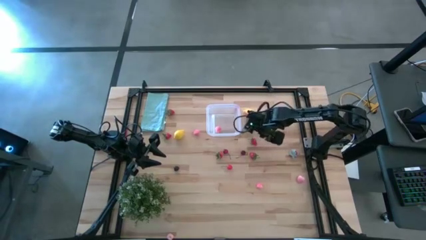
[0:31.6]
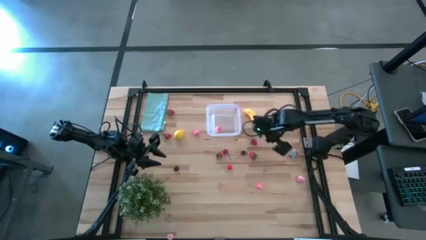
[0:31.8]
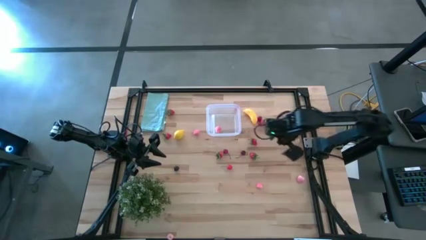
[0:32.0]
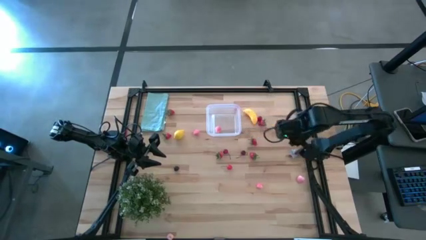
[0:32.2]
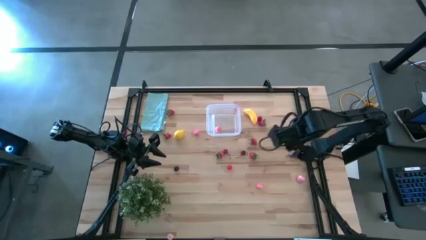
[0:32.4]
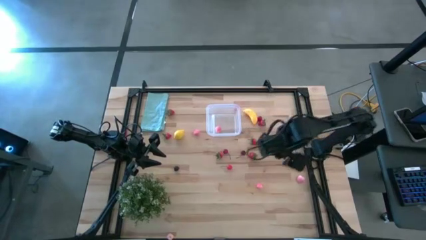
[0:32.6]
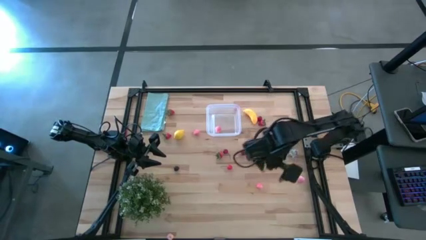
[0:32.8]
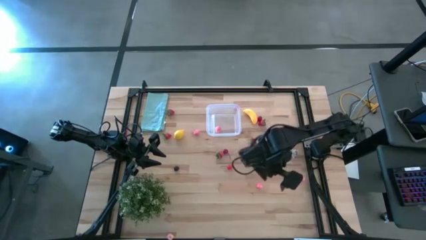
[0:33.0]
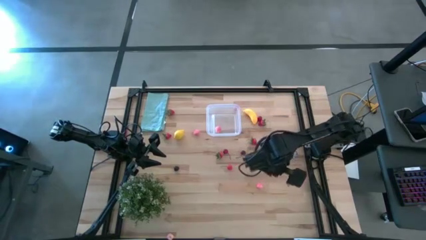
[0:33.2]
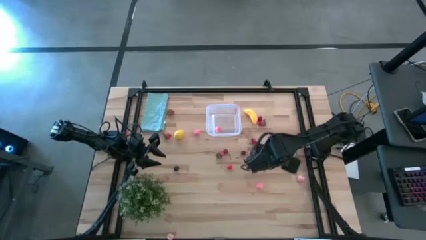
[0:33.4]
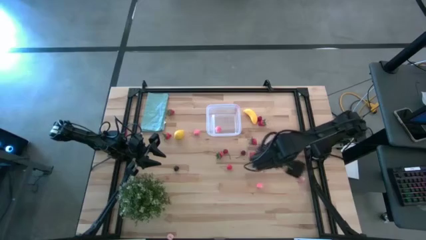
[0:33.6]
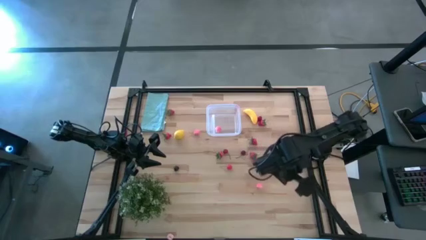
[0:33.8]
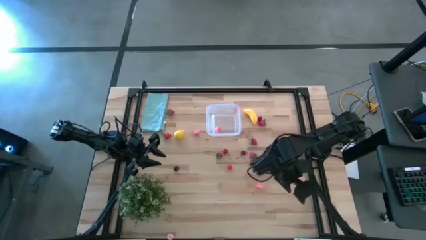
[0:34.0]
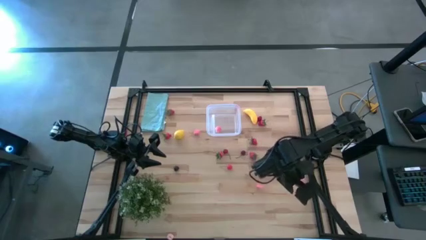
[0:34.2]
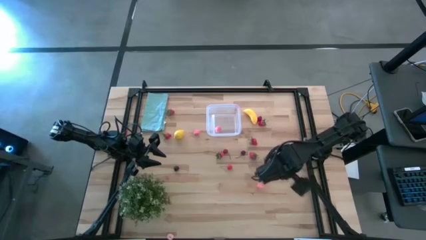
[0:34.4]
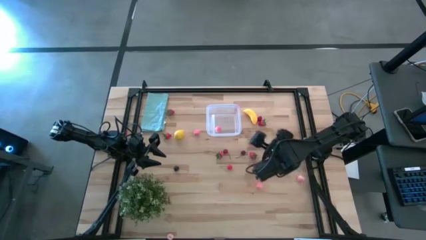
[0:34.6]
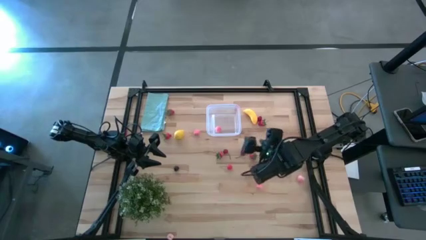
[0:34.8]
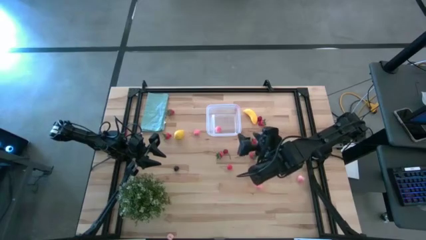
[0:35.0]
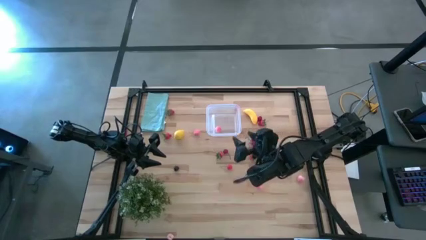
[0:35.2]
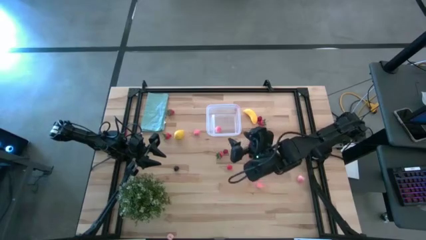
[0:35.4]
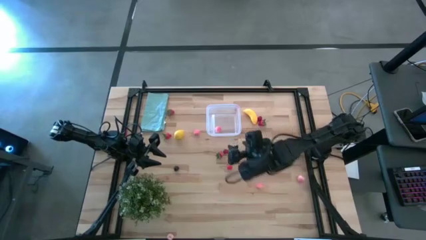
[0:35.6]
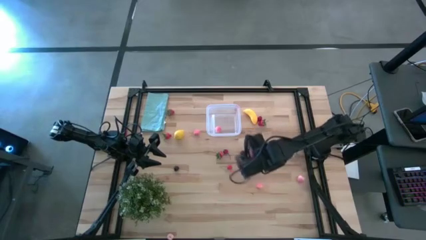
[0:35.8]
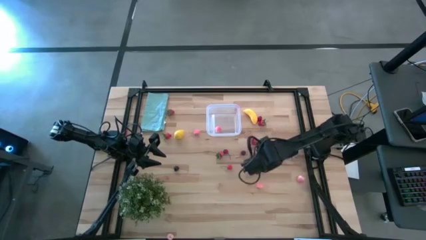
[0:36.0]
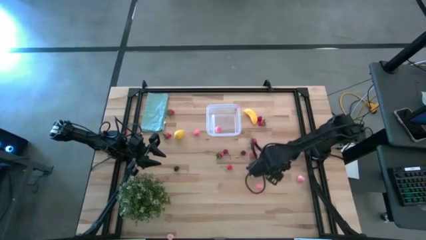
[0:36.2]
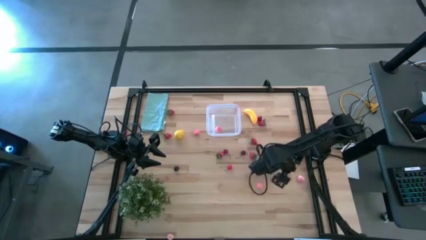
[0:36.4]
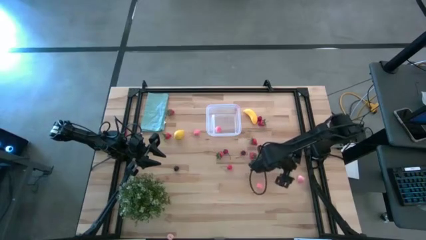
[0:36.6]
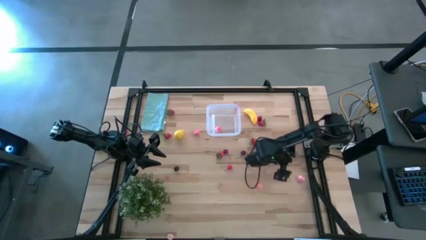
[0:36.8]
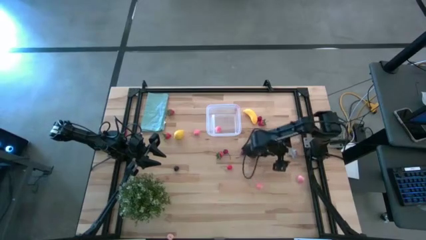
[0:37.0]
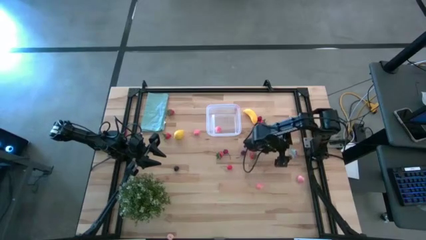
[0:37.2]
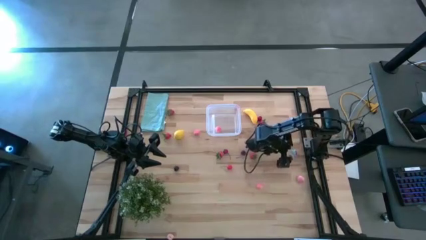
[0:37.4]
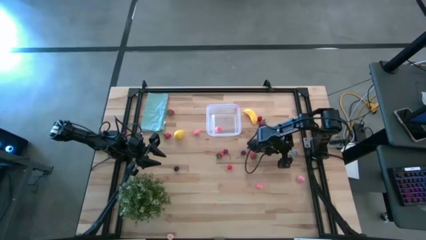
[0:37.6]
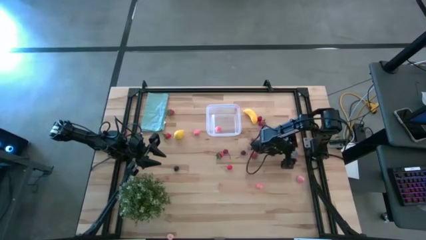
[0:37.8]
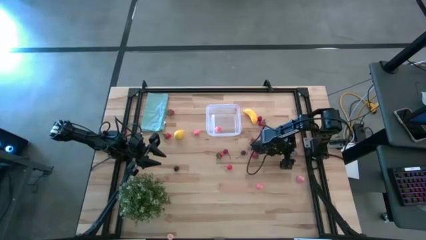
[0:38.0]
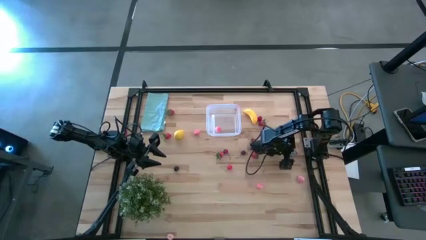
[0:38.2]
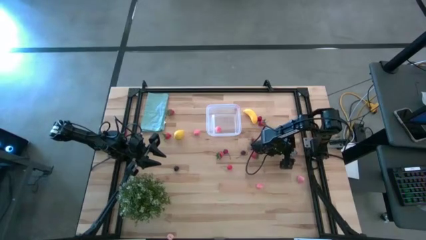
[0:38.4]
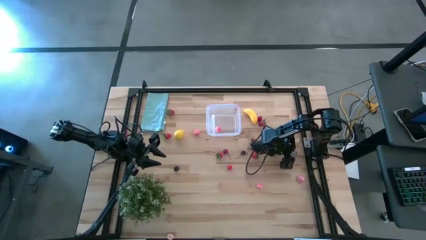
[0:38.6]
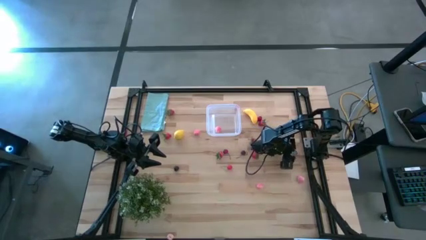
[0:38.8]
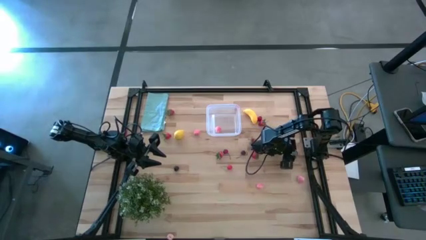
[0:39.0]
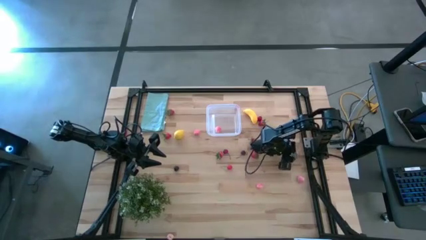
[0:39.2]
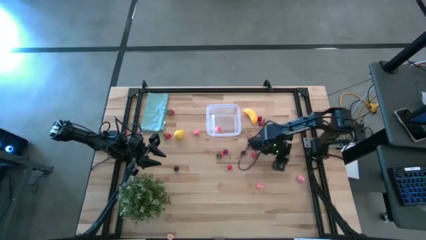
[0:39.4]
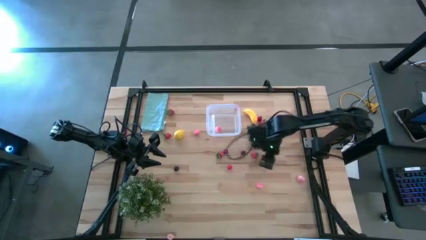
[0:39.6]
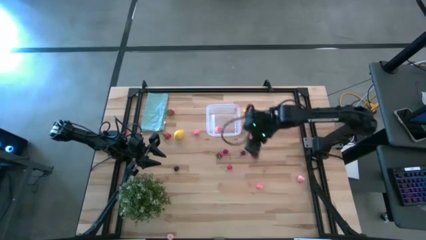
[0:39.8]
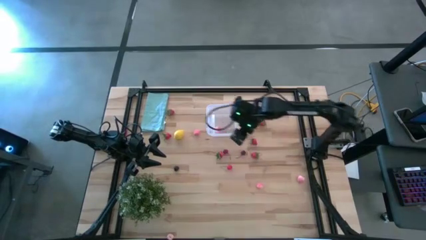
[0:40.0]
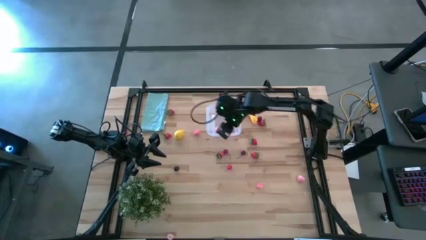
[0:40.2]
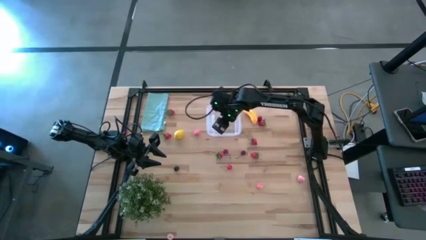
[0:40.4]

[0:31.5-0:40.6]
Task: Pick and placing Produce into tupperware
Put the red strawberry into the transparent bin

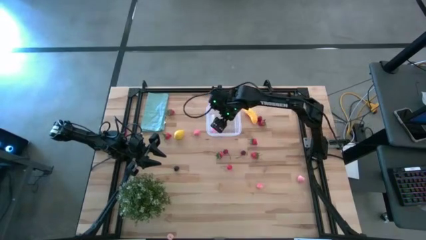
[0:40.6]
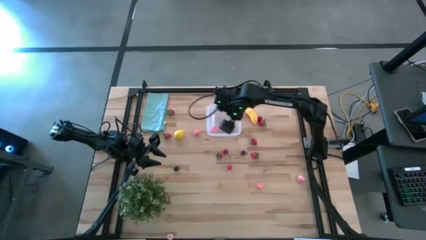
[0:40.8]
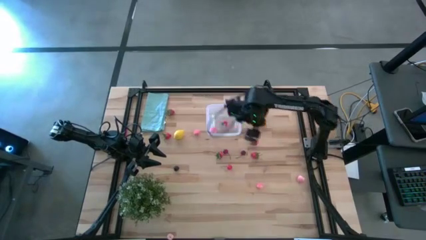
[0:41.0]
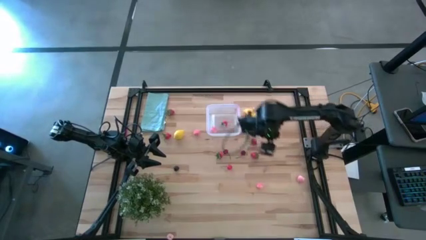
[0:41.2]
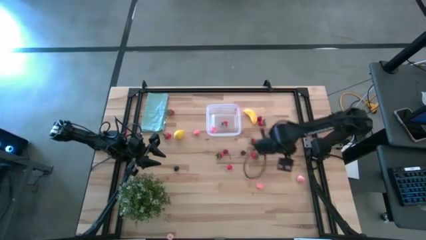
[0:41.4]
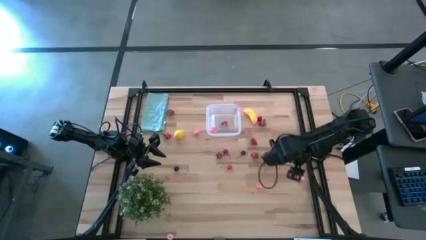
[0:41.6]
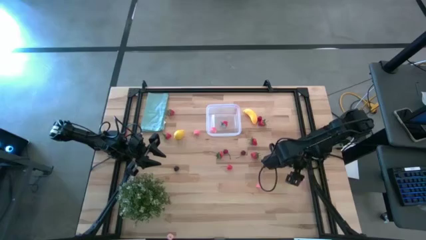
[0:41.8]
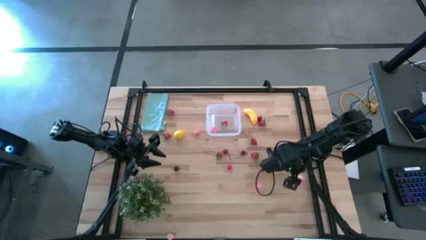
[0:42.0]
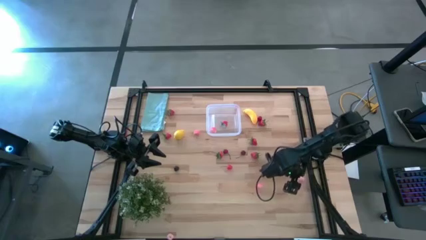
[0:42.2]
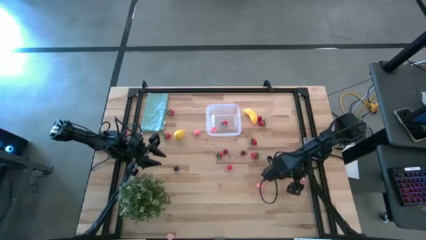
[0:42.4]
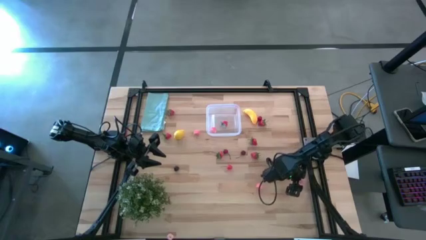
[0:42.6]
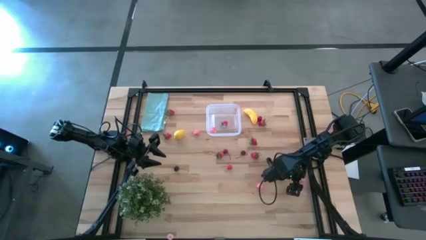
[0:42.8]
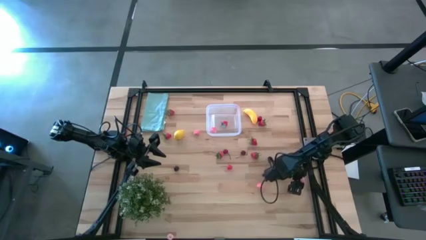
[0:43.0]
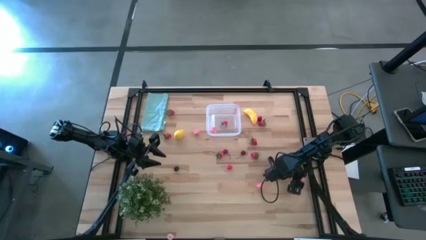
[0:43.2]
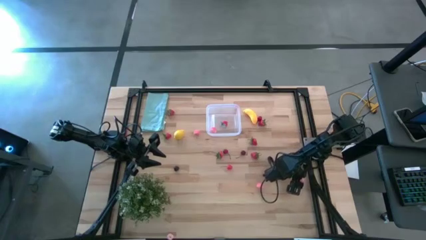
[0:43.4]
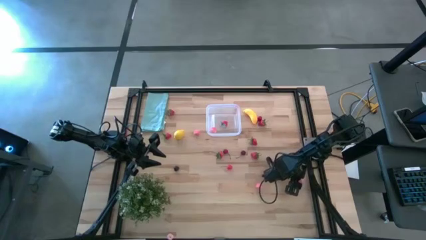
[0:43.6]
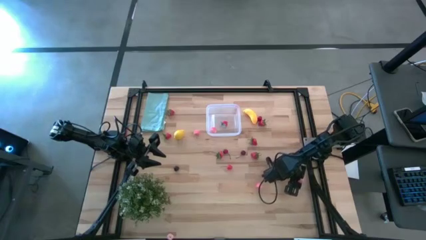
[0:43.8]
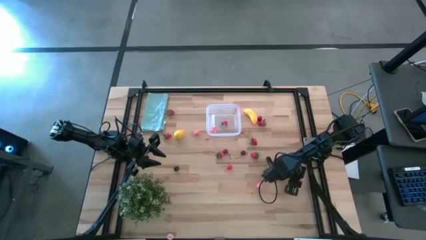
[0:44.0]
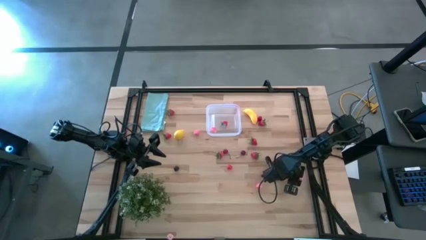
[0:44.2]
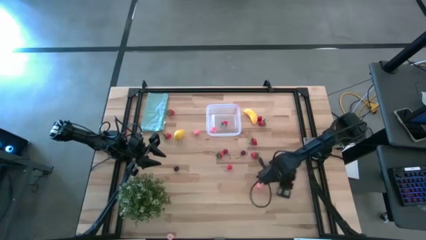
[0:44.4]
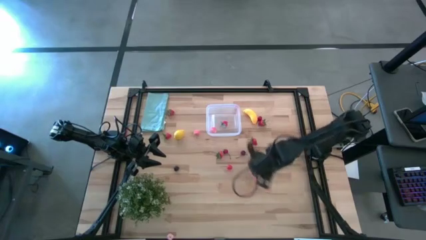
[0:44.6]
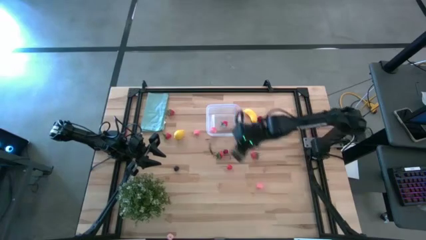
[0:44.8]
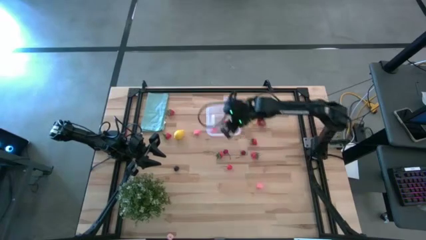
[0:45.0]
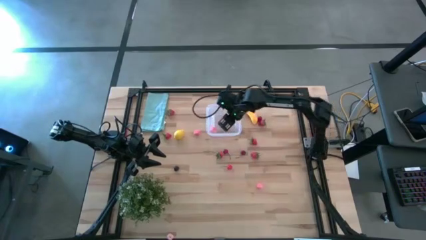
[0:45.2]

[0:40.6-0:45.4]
Put the pink peach into the transparent bin

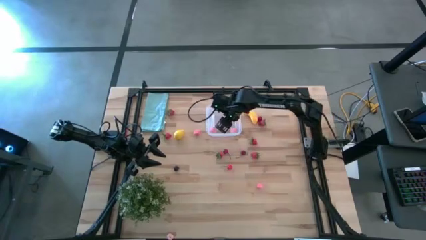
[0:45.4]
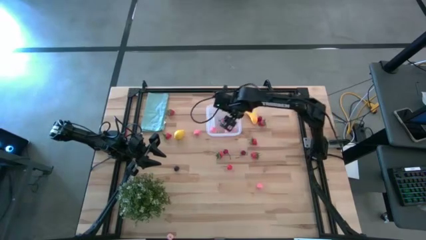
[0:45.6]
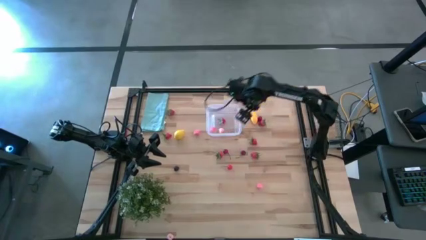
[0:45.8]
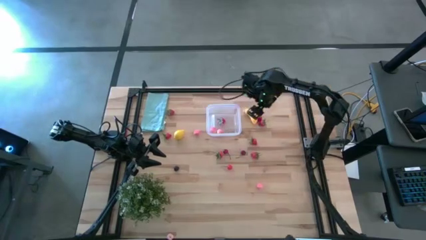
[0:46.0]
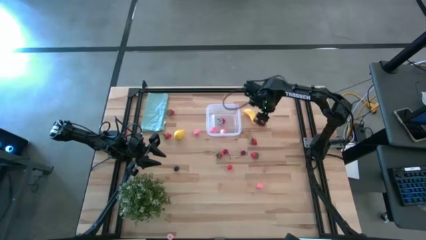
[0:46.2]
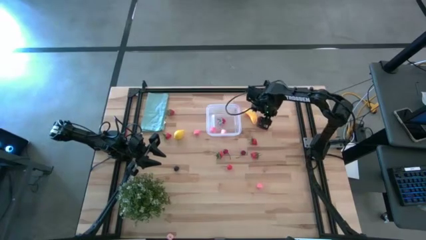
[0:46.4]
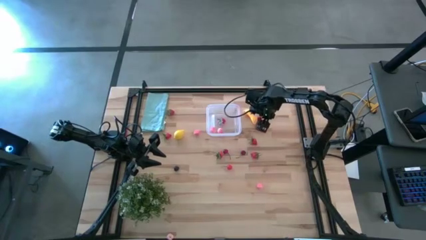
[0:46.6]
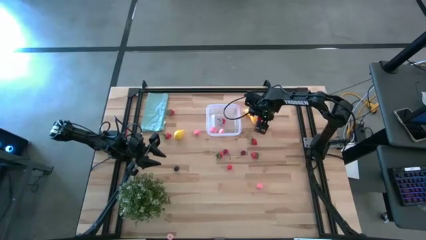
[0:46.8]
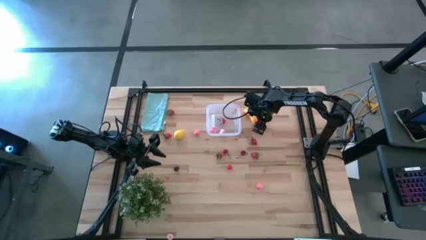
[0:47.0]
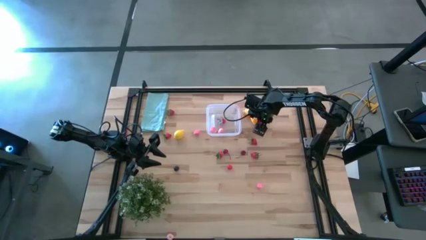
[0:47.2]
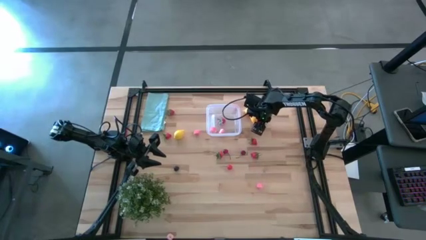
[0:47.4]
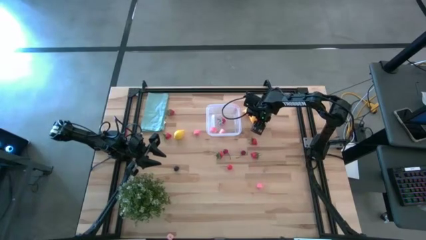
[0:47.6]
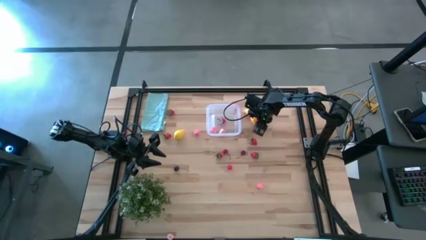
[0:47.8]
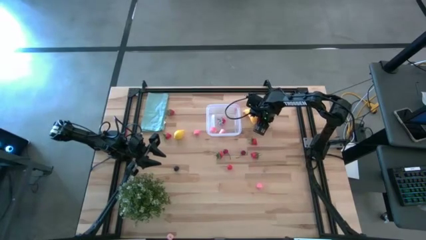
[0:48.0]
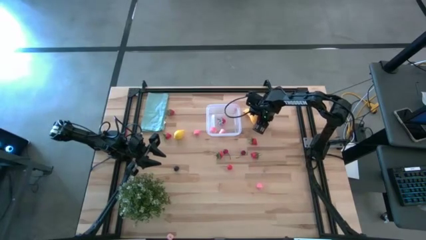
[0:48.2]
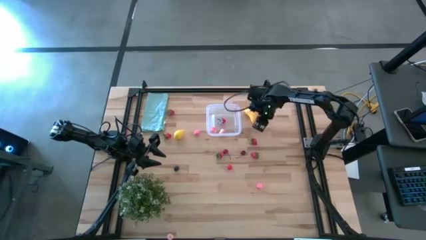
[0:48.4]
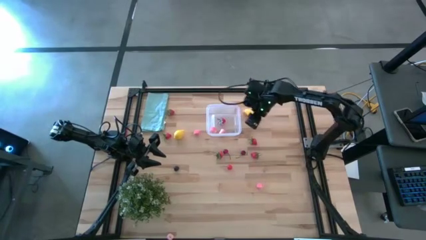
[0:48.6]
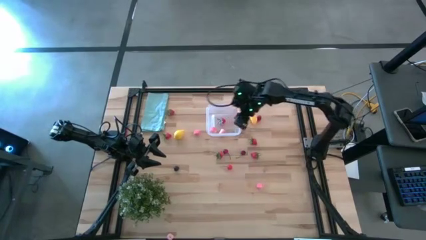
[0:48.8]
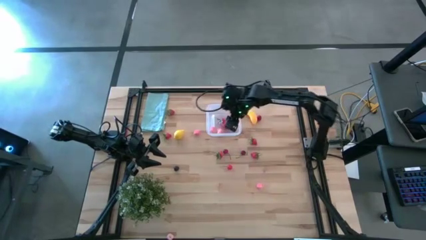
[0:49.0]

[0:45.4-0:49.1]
Put the red strawberry into the transparent bin
